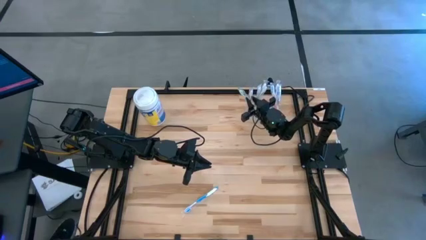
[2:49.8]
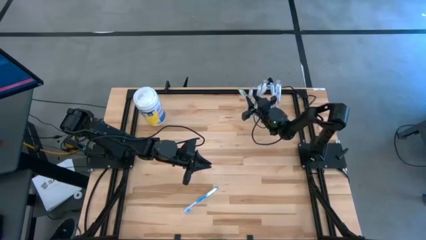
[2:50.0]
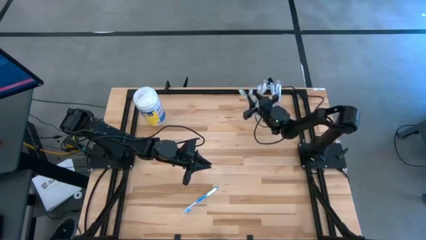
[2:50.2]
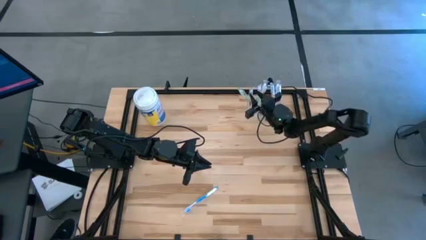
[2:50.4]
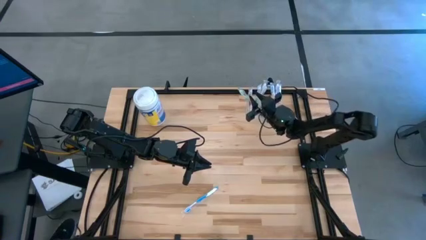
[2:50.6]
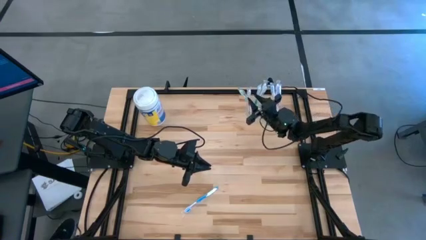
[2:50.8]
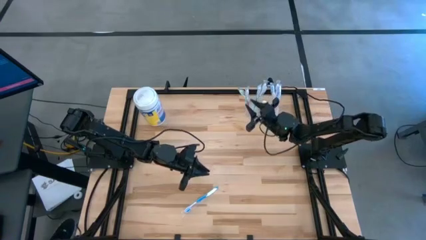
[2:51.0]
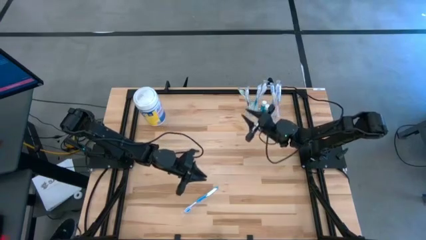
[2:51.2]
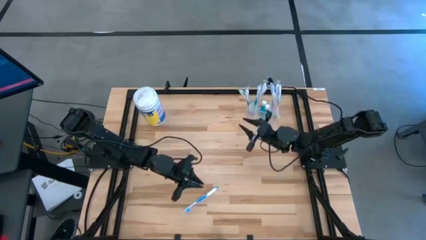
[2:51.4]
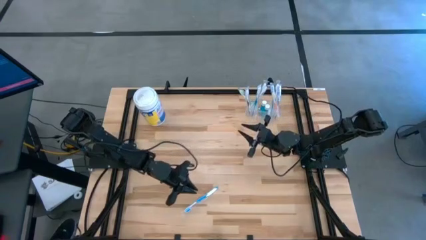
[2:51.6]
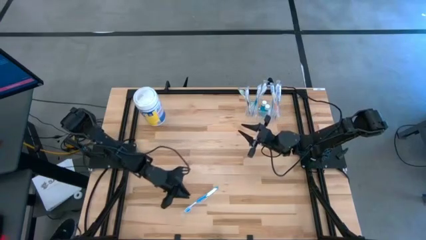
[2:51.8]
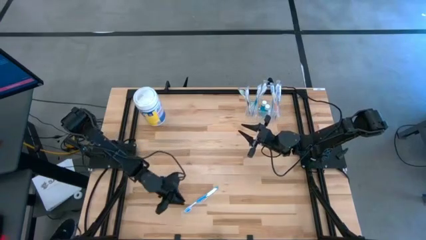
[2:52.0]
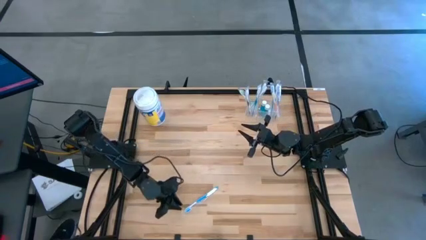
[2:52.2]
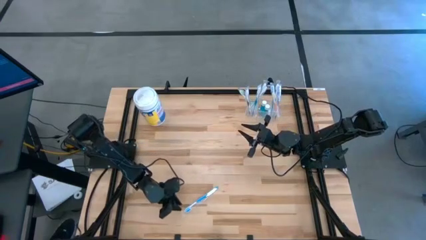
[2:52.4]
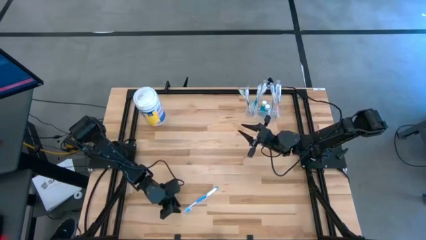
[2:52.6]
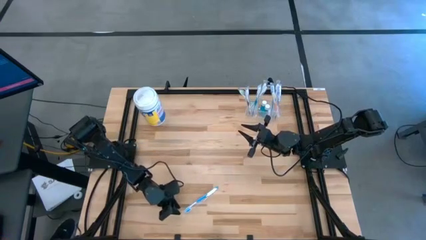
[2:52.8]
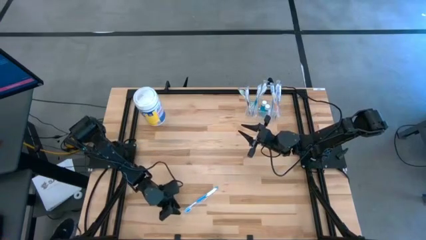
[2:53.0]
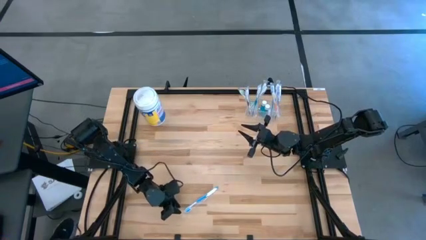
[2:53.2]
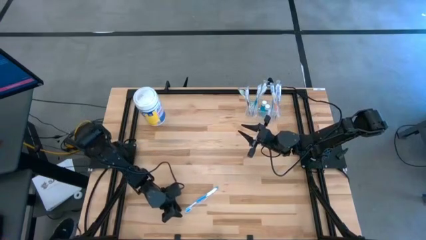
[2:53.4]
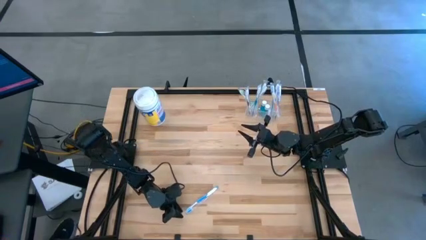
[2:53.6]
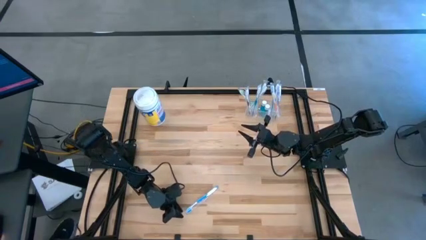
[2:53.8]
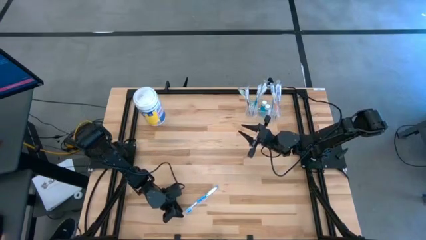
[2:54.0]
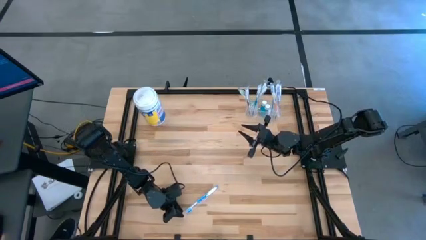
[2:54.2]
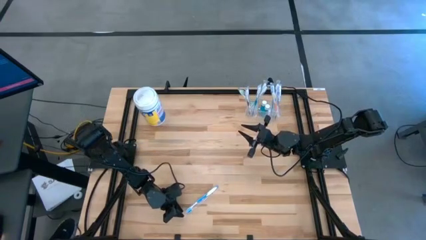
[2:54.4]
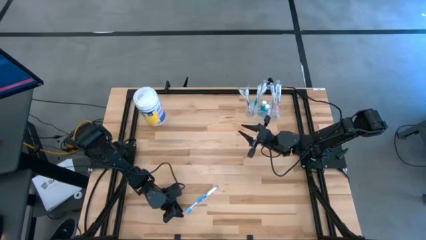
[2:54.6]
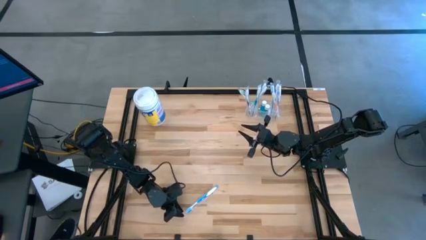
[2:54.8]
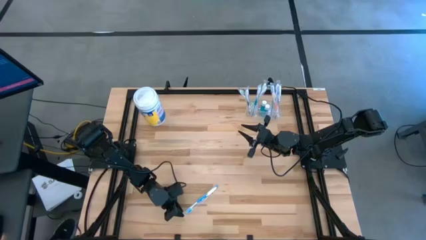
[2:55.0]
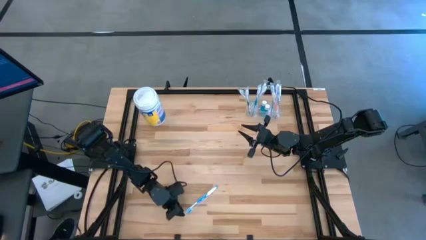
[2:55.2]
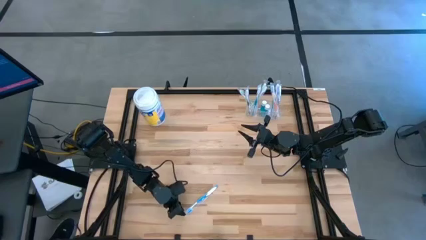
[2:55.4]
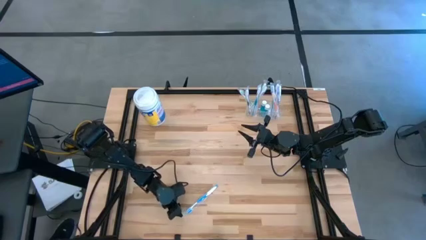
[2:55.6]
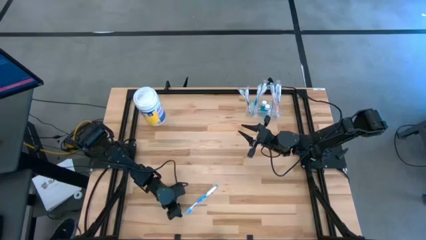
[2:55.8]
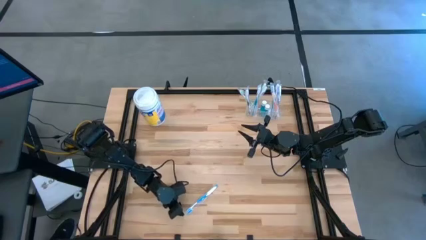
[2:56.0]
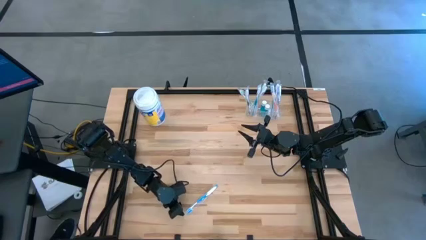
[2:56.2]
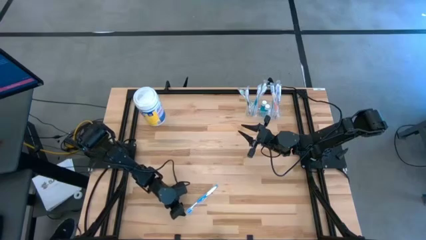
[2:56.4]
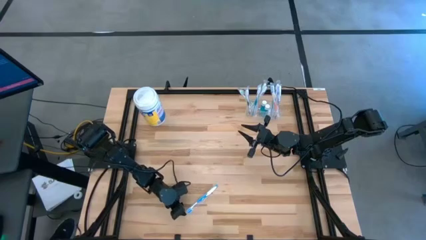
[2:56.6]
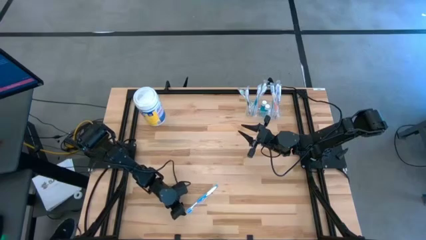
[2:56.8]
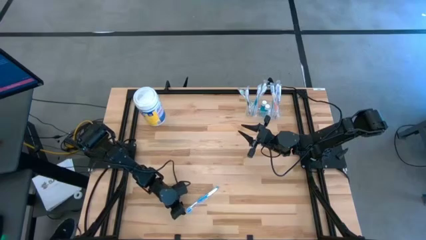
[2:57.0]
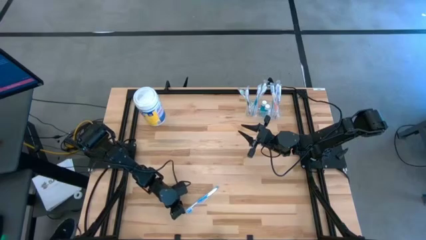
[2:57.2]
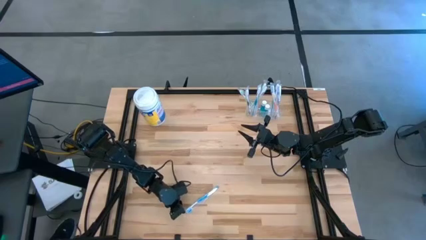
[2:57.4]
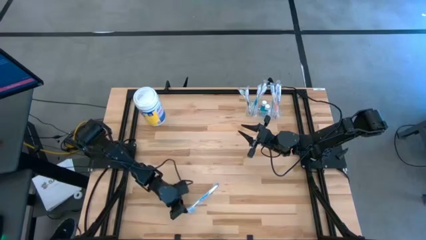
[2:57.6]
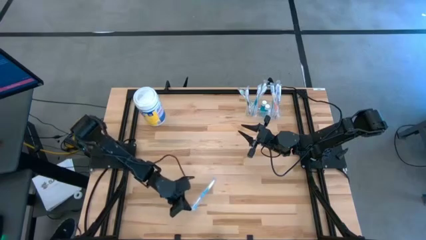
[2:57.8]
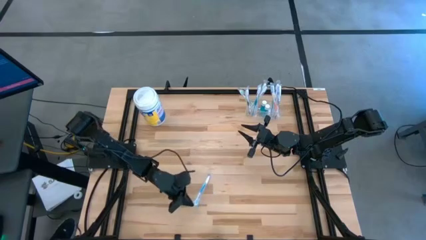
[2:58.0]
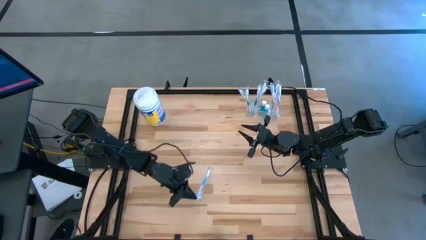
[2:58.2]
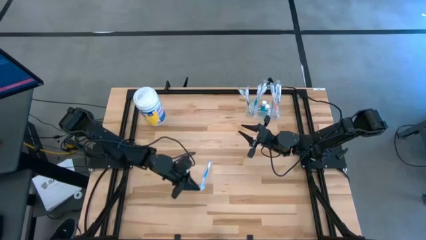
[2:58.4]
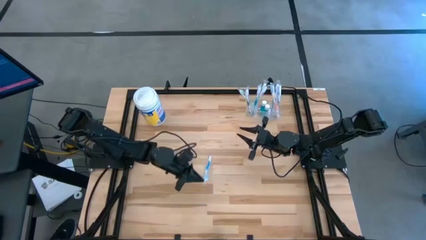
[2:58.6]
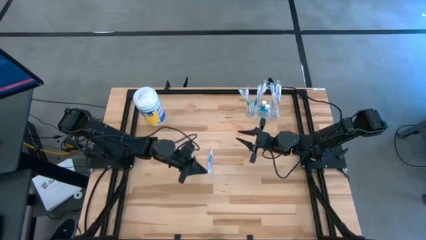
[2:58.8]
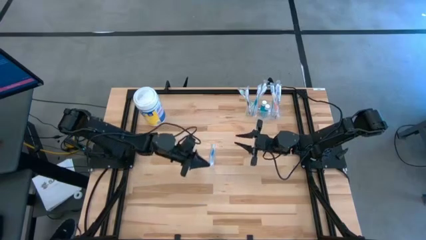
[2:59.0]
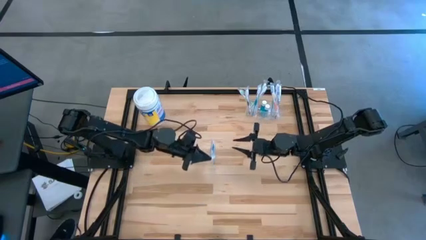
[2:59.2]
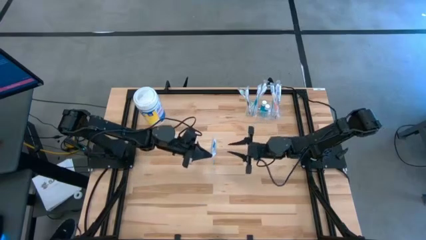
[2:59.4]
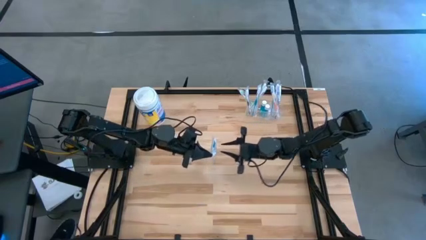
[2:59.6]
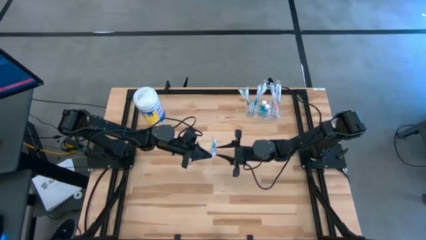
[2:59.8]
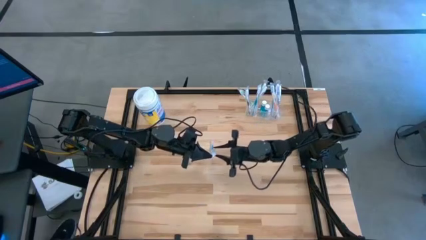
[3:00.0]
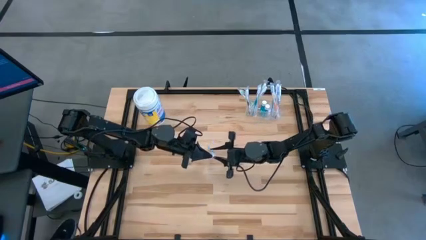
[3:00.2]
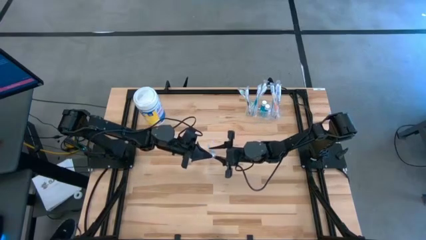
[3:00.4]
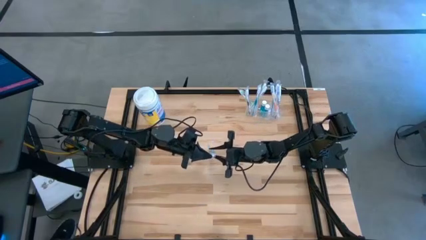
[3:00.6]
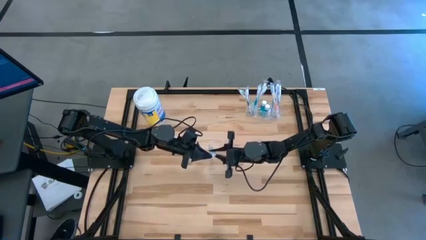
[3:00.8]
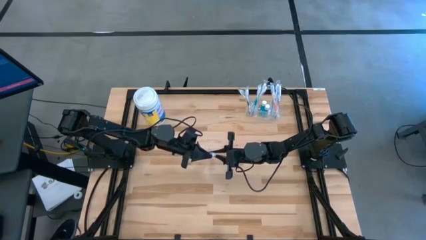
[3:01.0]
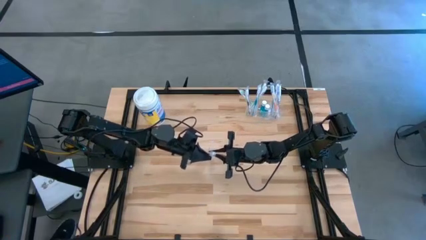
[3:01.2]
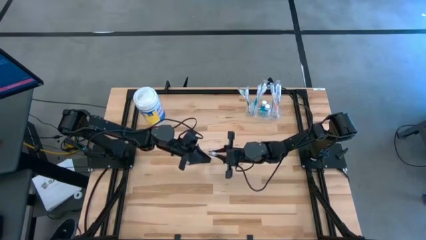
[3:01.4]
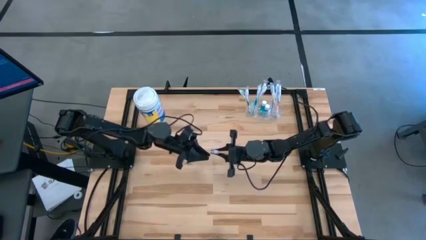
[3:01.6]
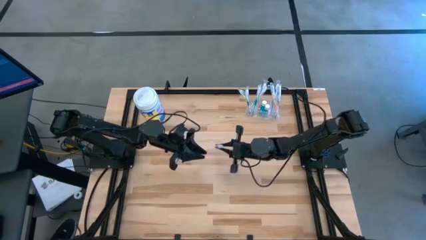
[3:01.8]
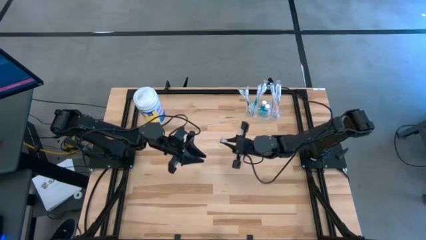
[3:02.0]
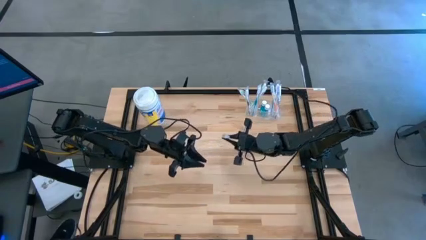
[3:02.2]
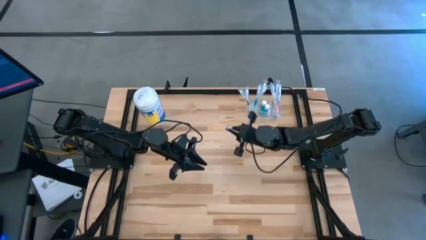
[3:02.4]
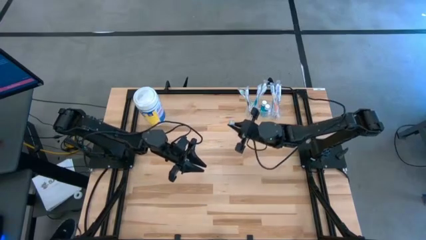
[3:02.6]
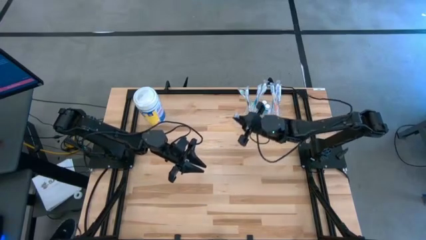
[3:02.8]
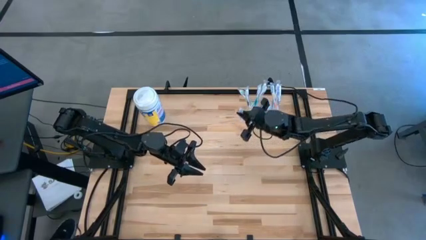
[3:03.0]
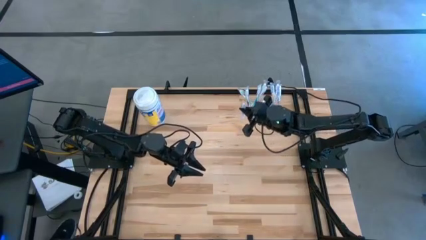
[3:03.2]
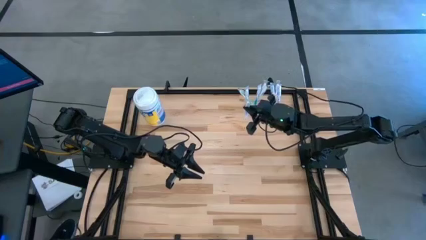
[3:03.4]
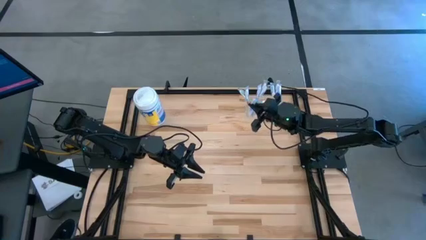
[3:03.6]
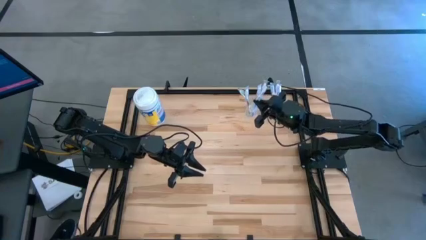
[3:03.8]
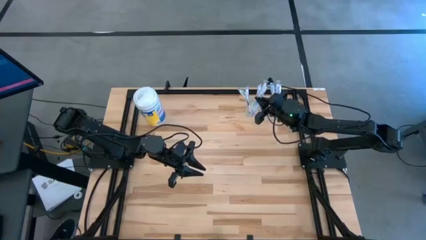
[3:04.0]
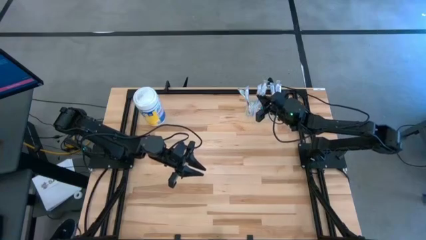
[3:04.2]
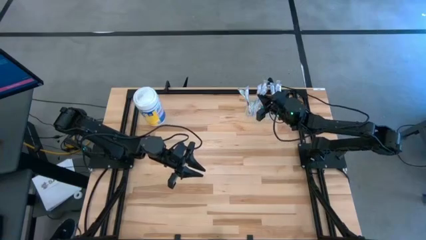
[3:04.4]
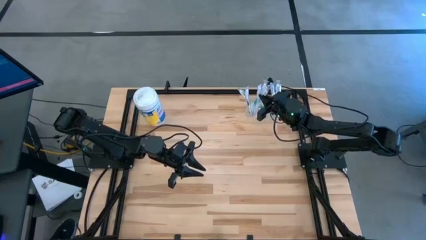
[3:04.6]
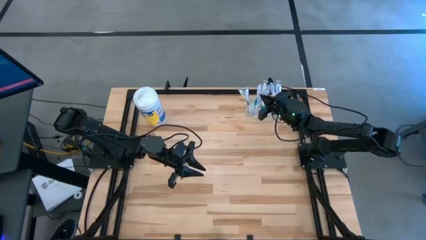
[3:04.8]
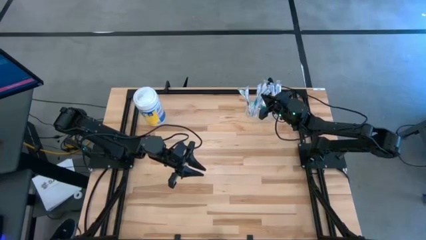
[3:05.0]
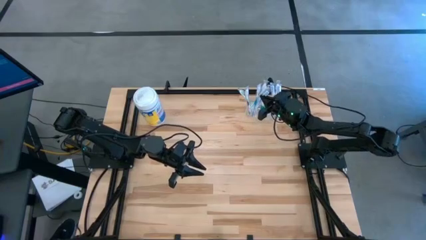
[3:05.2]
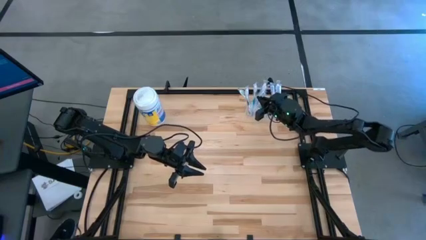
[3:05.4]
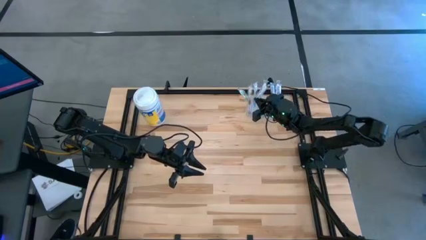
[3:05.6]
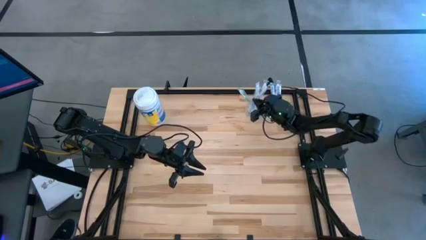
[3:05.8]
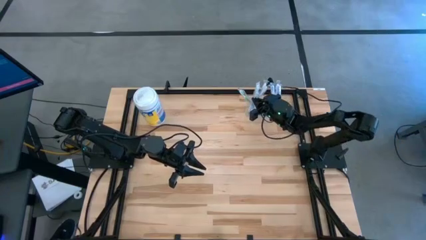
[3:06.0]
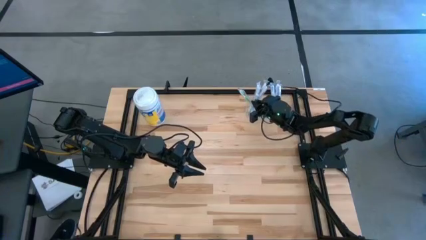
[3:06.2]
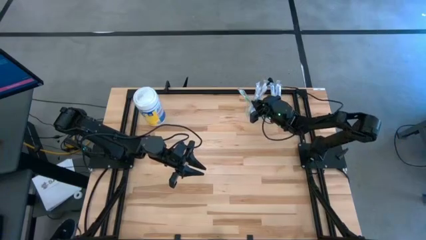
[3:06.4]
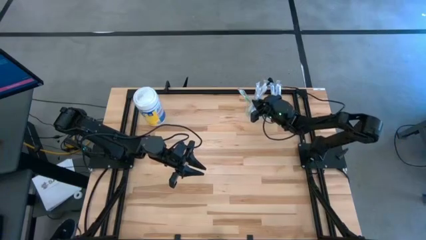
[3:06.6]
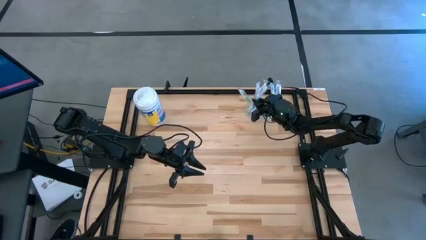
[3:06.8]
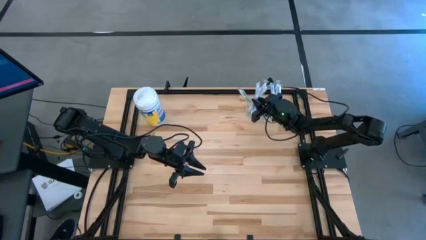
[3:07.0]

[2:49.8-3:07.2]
Task: Pick & Place toothbrushing station
Put the blue toothbrush into the left transparent organizer
